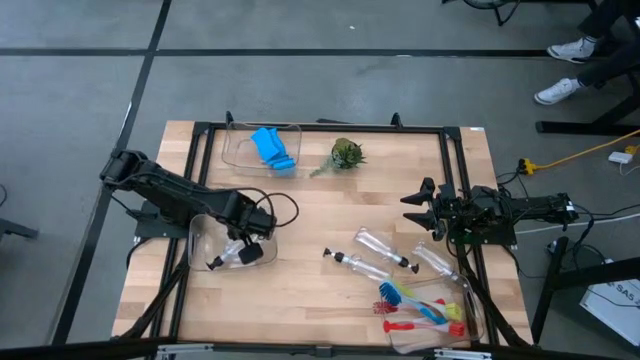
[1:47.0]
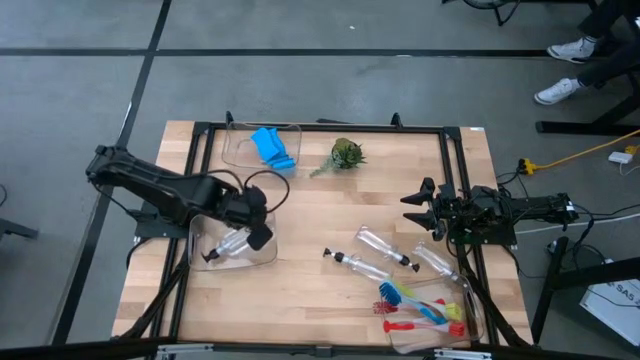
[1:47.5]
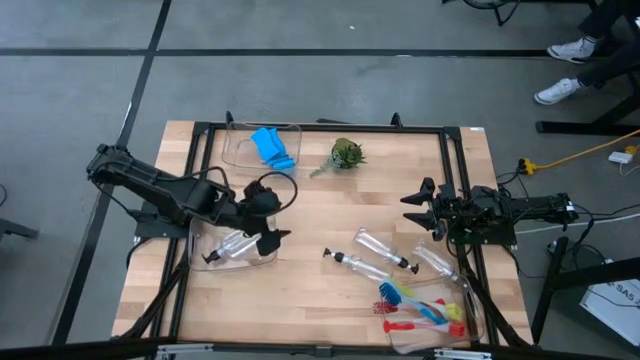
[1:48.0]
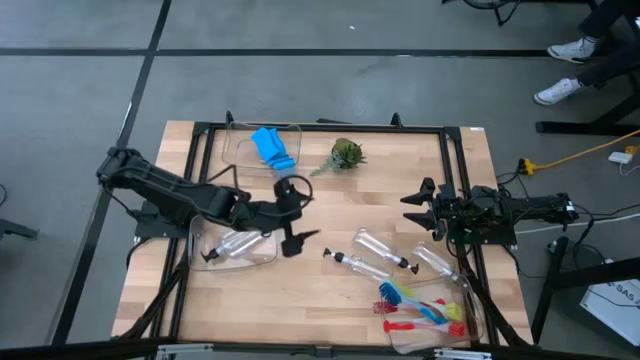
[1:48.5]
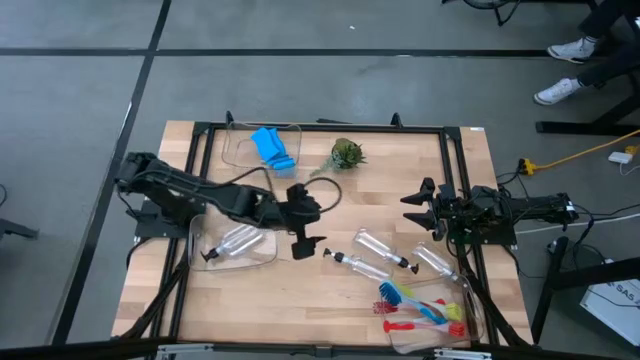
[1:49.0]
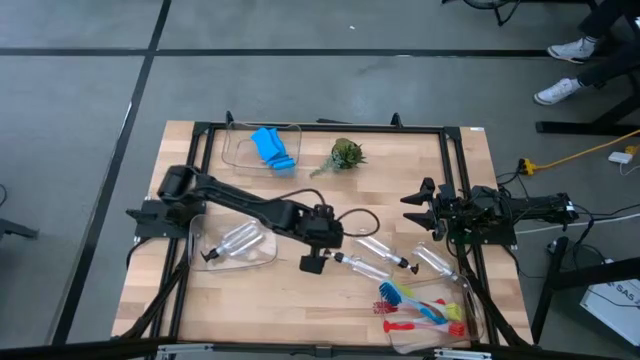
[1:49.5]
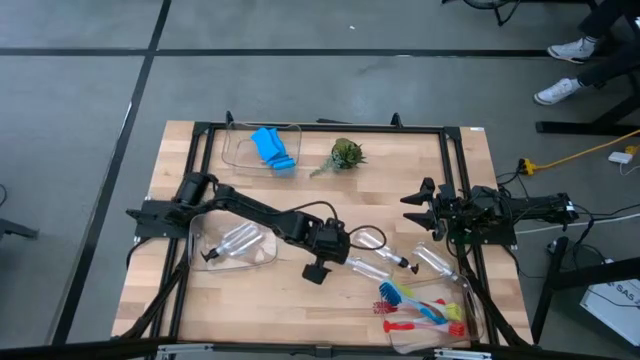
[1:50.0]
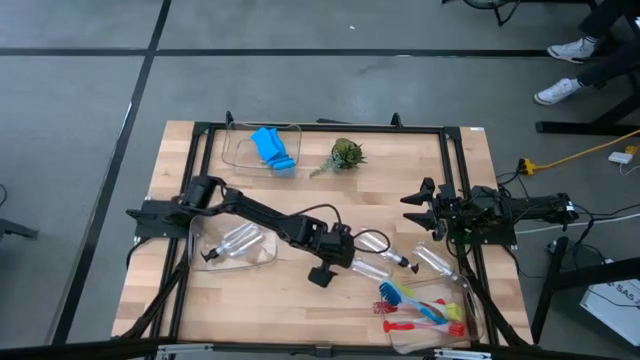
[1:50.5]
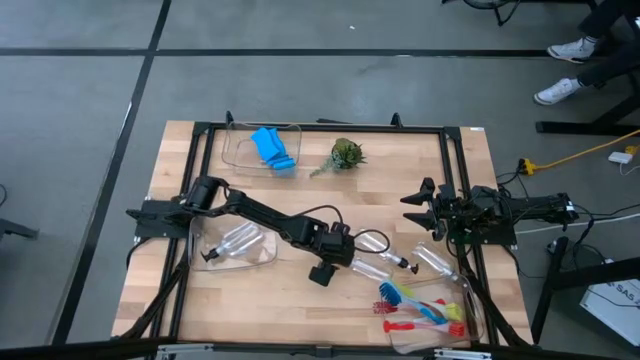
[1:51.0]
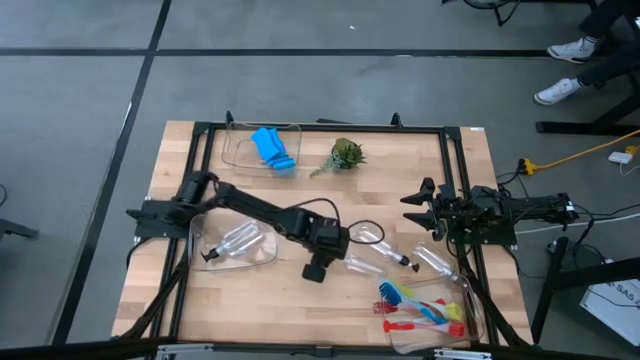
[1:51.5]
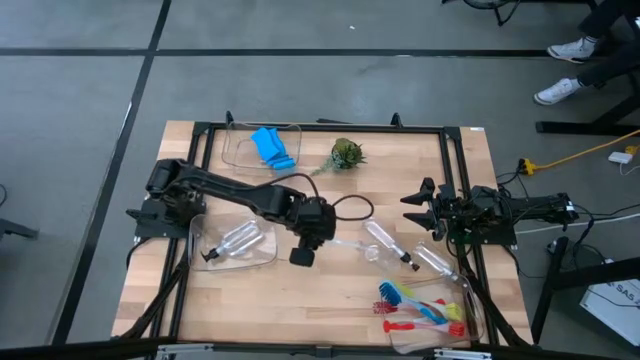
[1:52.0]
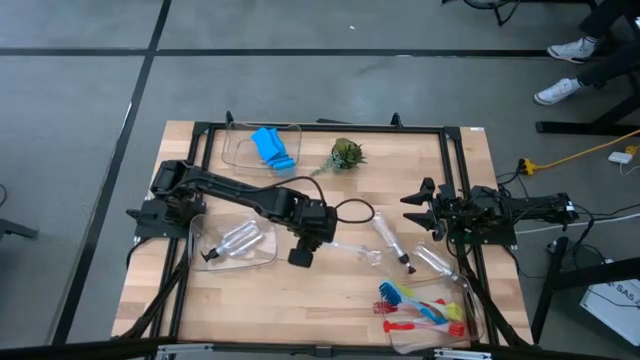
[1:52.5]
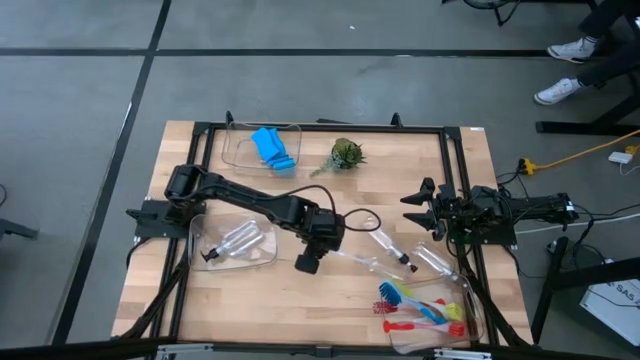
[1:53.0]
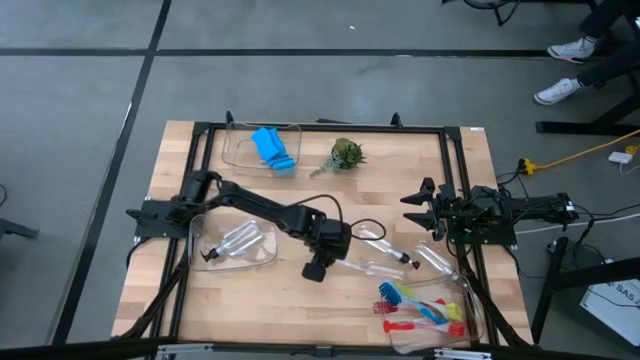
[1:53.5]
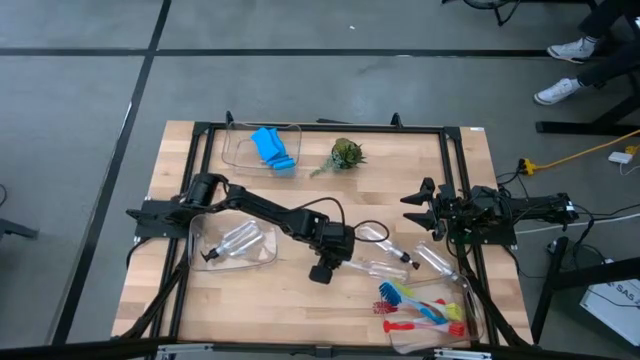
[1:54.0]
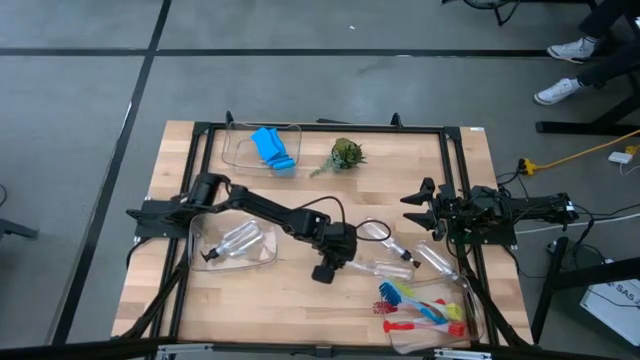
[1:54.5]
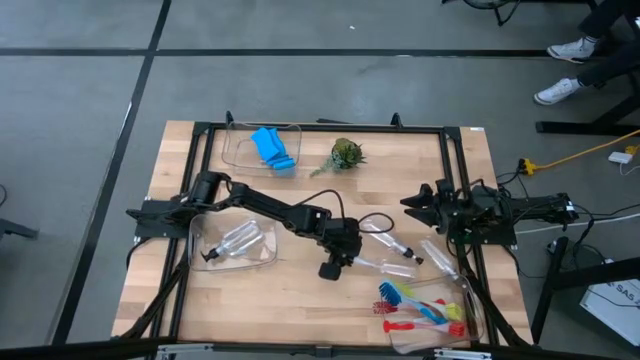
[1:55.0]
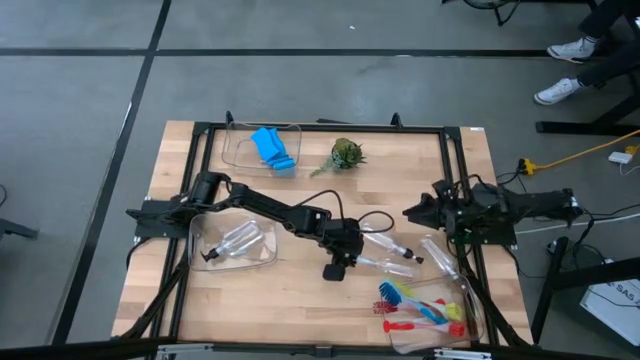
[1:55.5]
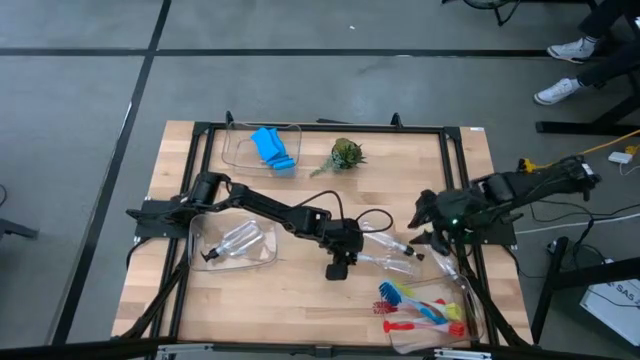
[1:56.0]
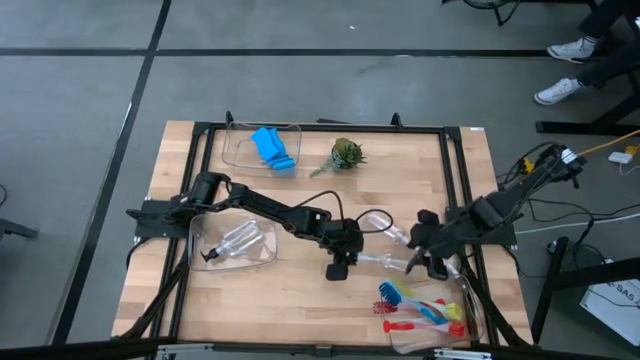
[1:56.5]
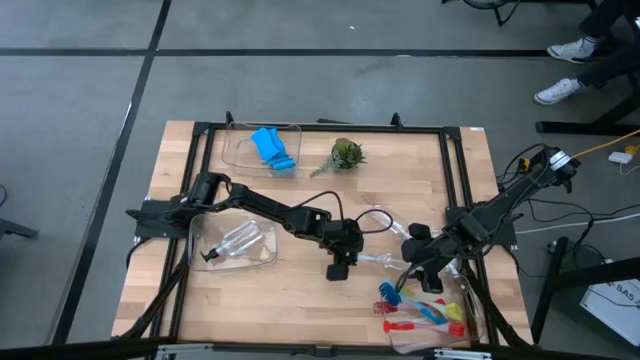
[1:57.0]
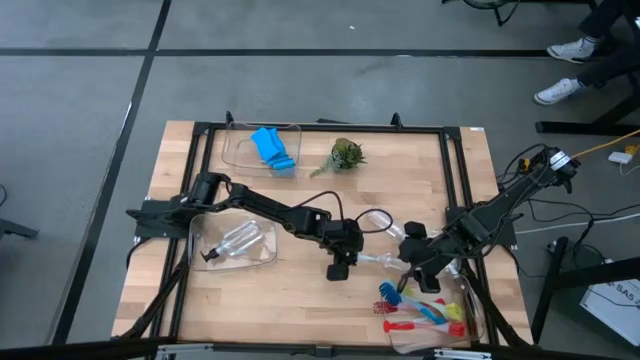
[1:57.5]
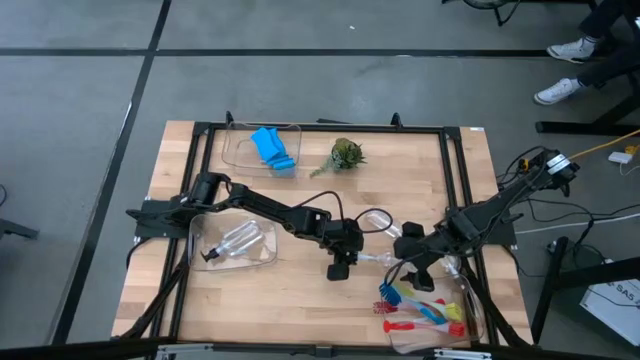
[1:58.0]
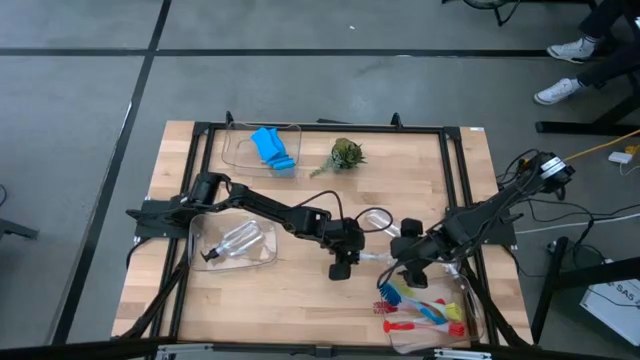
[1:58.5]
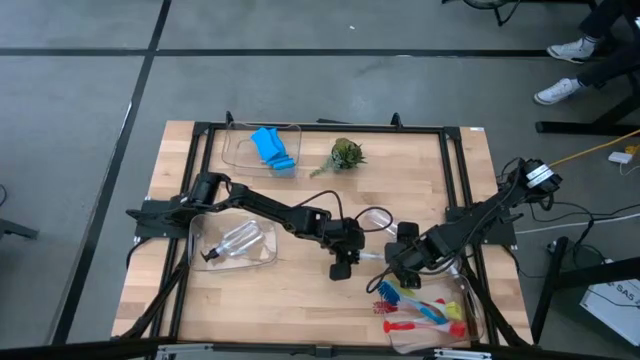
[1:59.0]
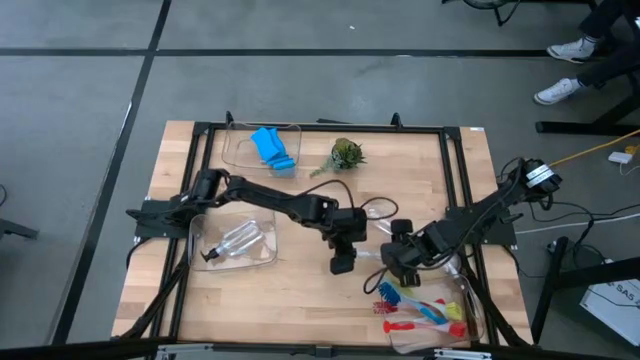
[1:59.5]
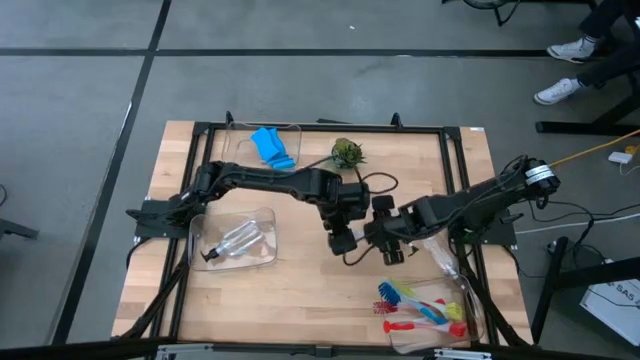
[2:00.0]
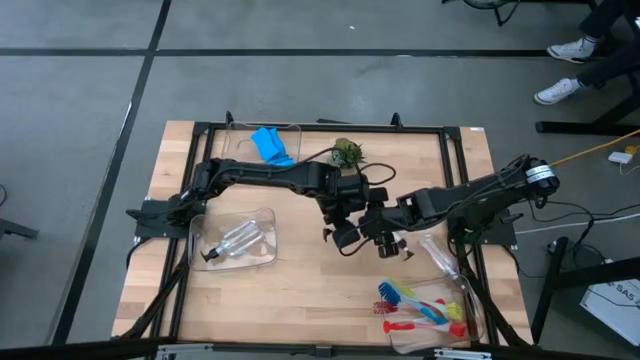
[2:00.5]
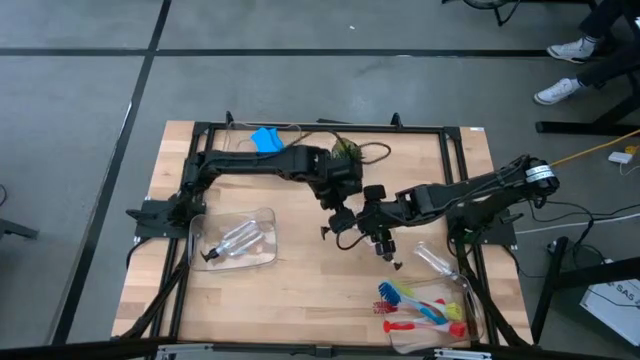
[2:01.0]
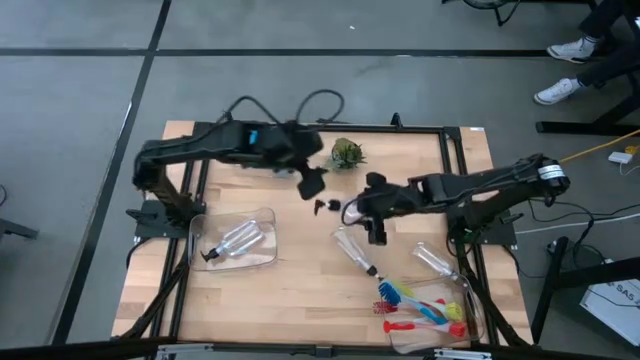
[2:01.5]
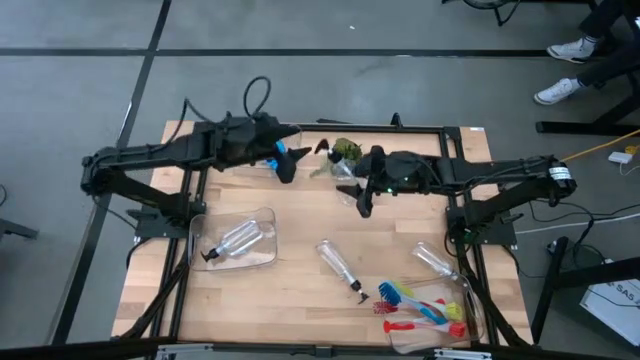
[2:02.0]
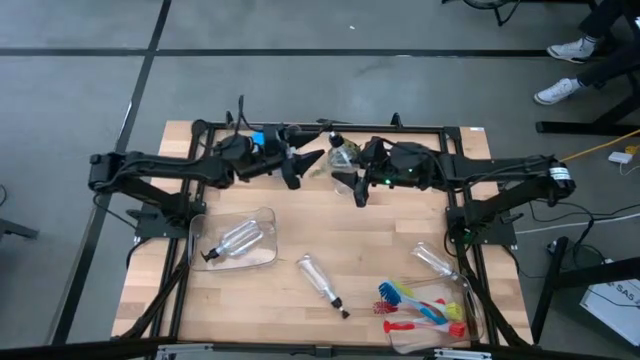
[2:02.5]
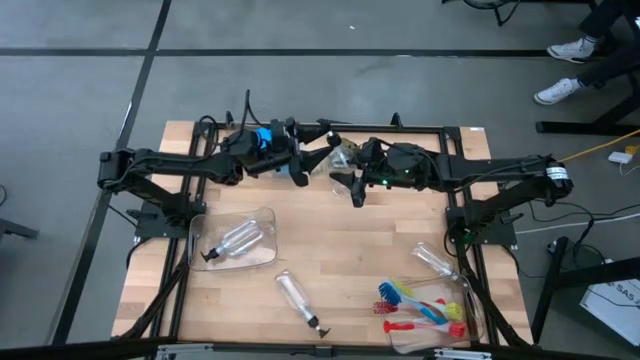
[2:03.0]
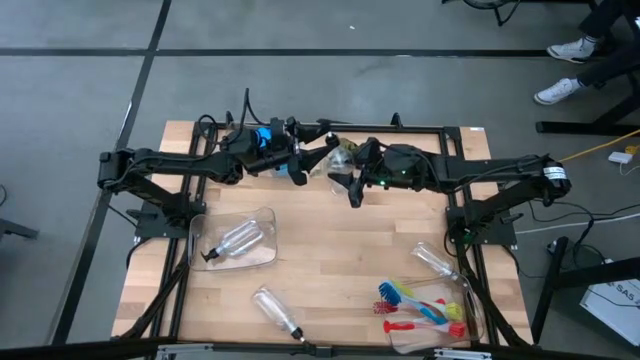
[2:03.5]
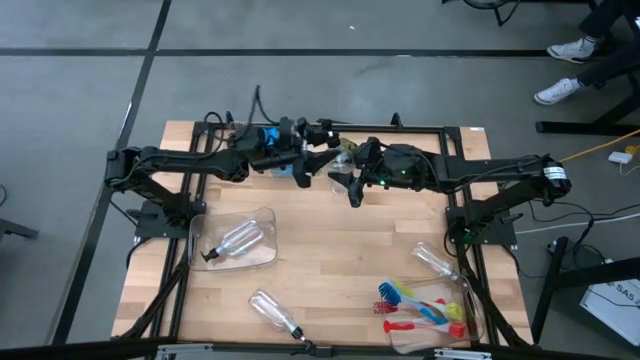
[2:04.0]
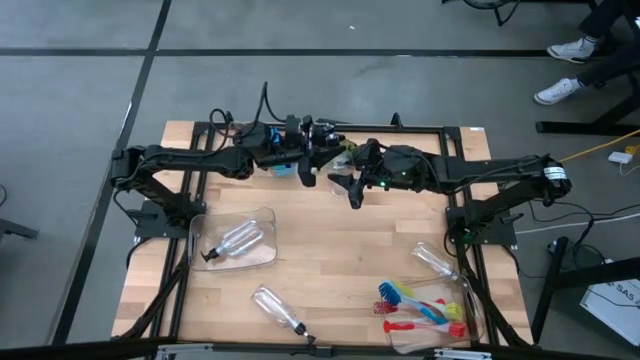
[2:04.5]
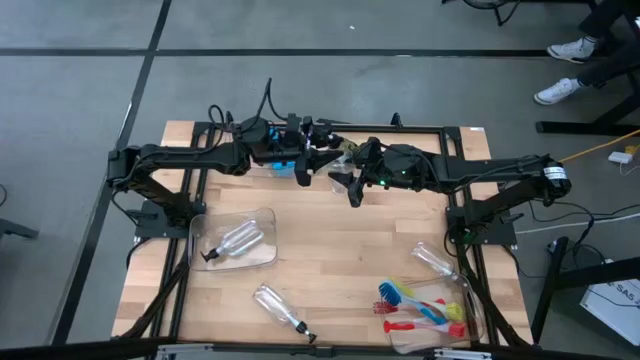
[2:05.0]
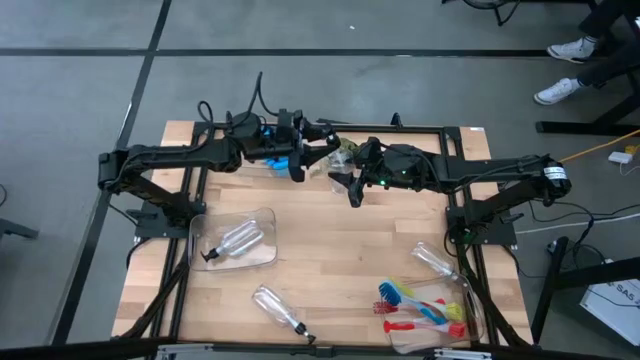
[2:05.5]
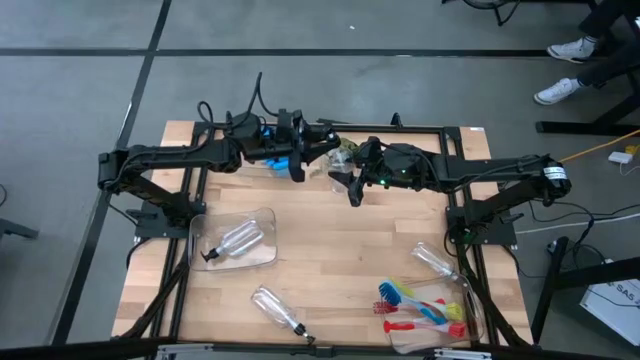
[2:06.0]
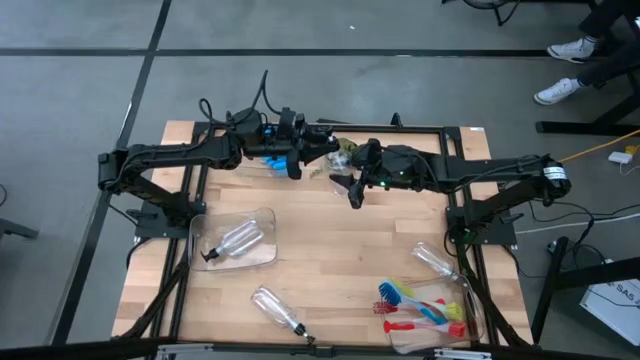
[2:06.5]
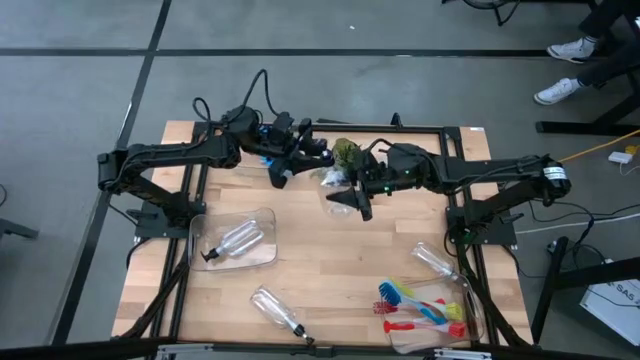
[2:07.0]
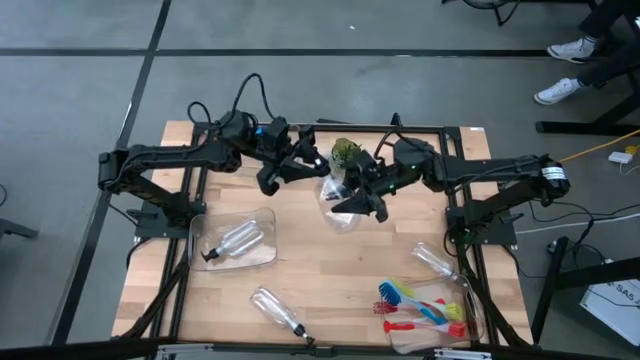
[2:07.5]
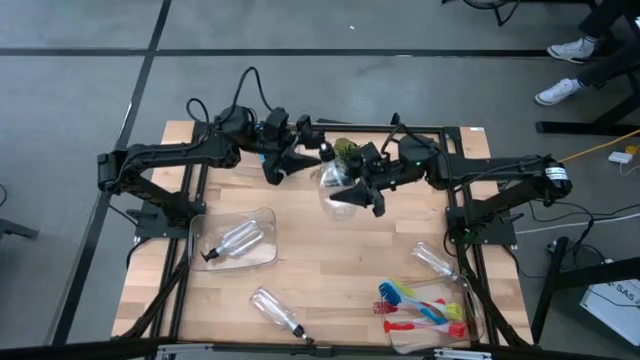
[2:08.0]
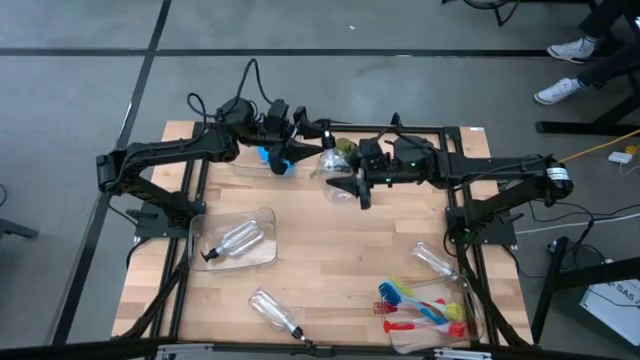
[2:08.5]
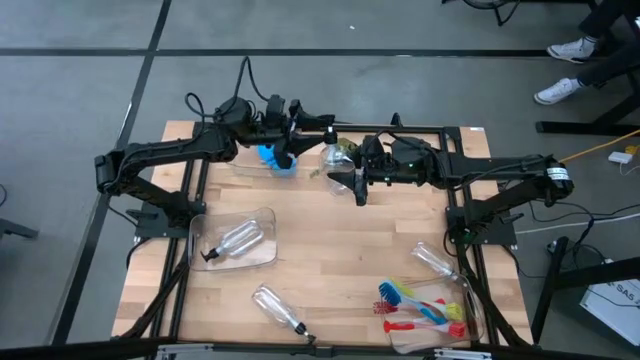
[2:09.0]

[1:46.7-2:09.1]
Task: Pick & Place Kitchen Sink Supplies
Put the transparent soap dispenser into the middle transparent bin
